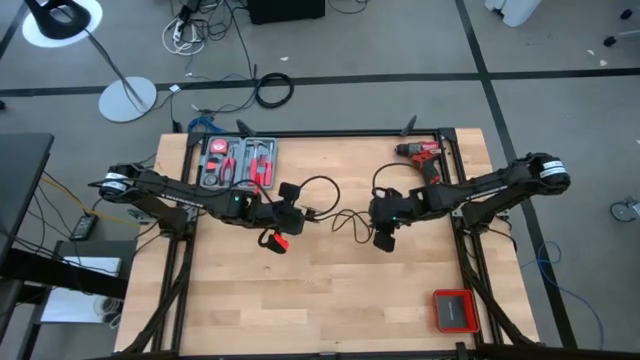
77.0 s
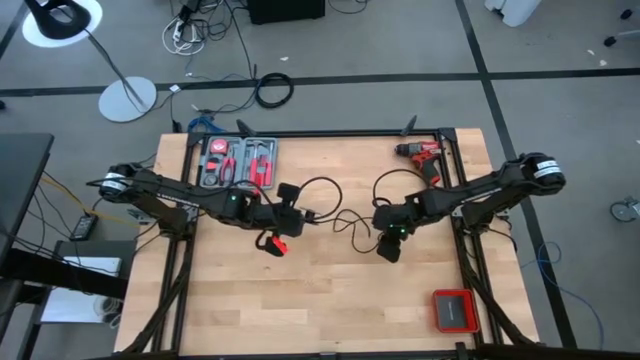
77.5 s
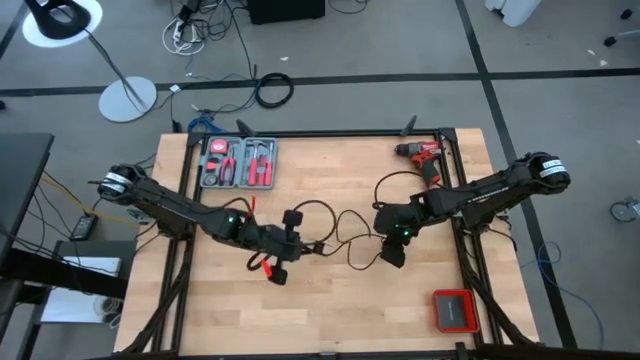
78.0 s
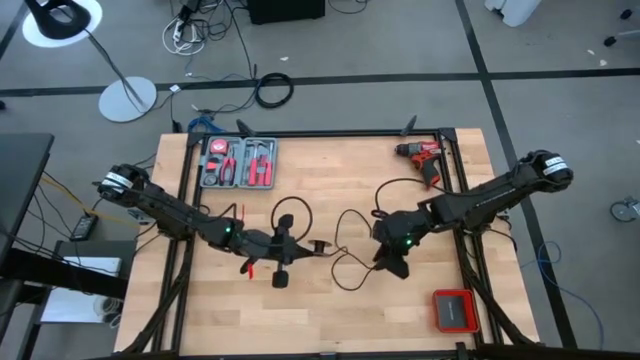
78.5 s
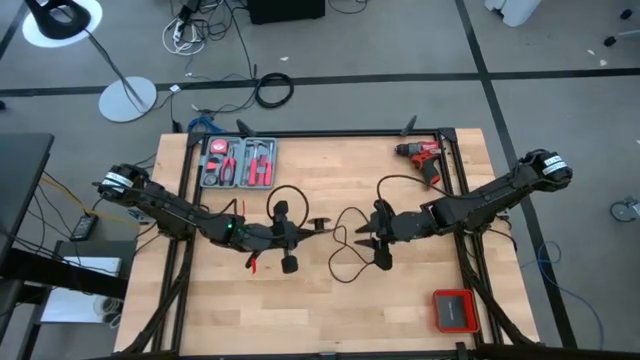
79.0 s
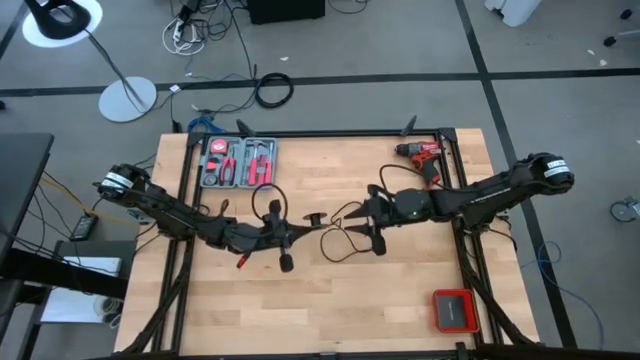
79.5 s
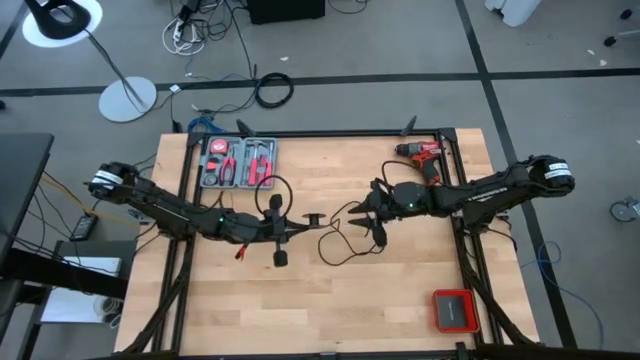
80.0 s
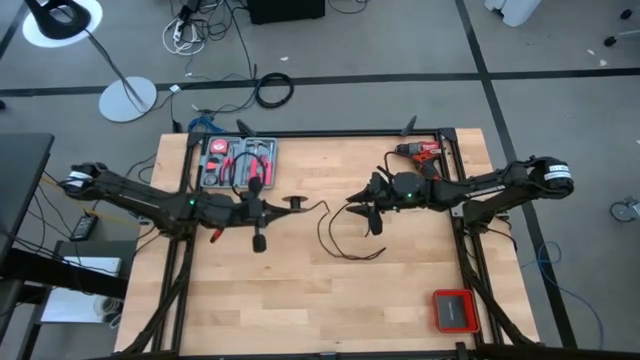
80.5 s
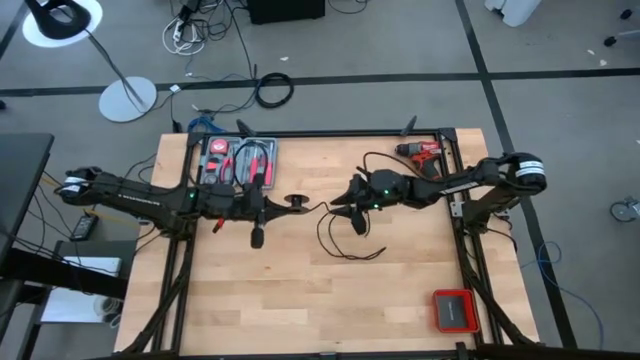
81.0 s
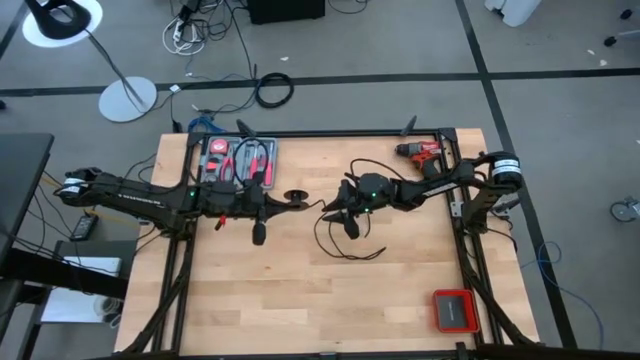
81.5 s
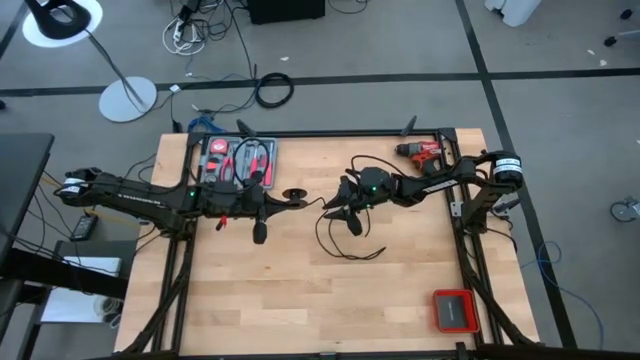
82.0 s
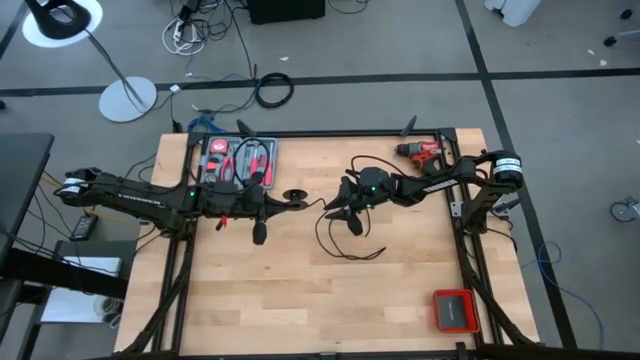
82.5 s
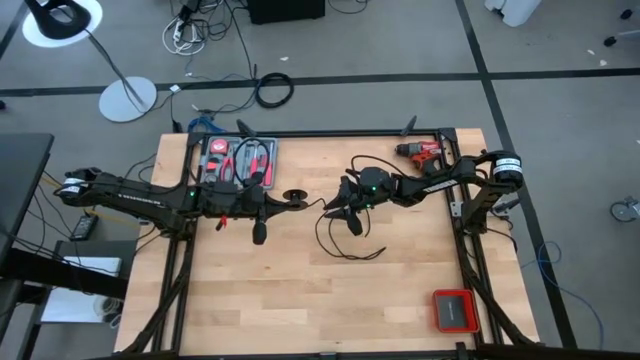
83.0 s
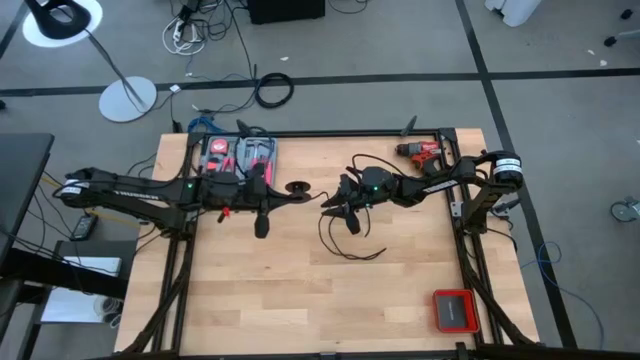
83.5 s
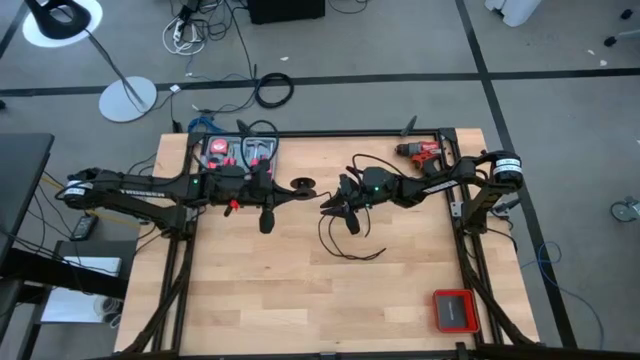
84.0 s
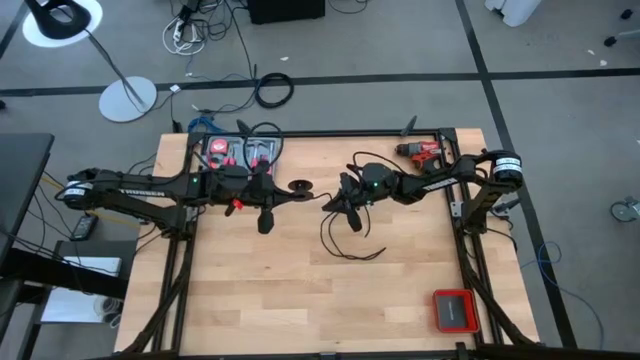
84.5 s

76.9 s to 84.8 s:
Task: Coil cords
Coil the black wire on the black spool

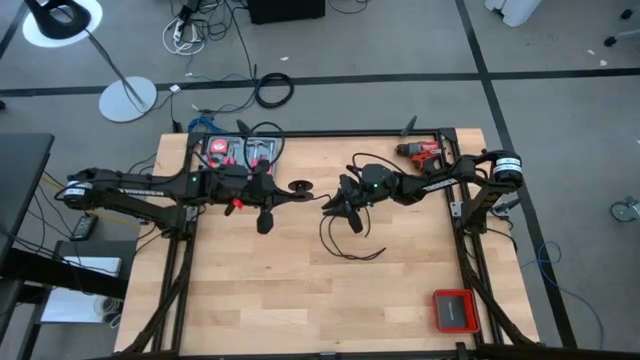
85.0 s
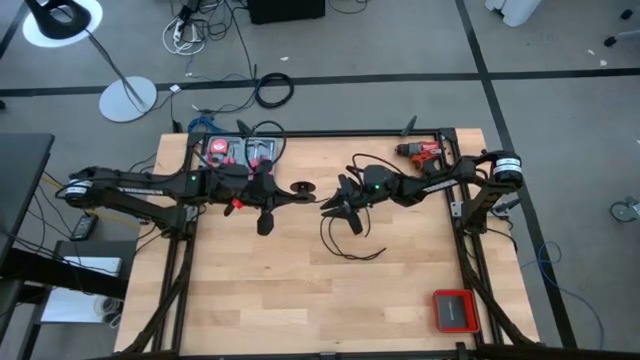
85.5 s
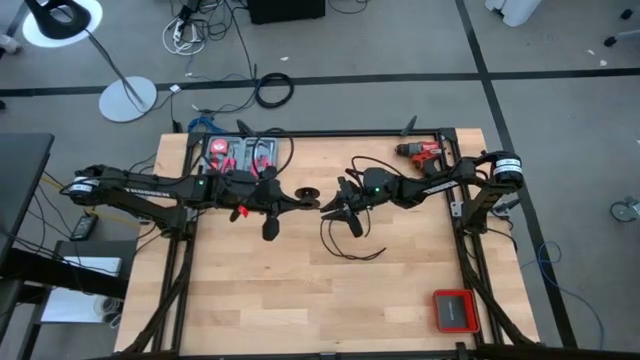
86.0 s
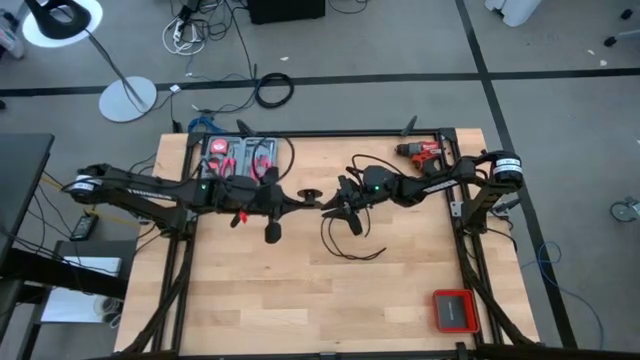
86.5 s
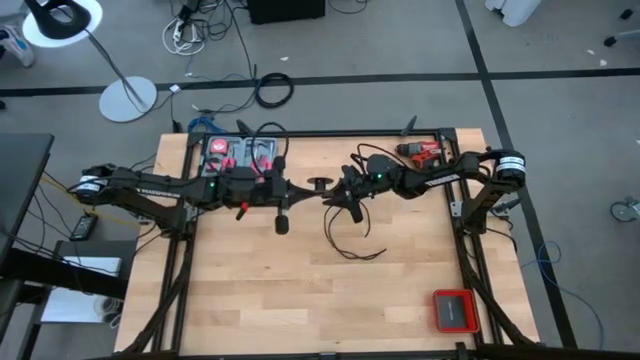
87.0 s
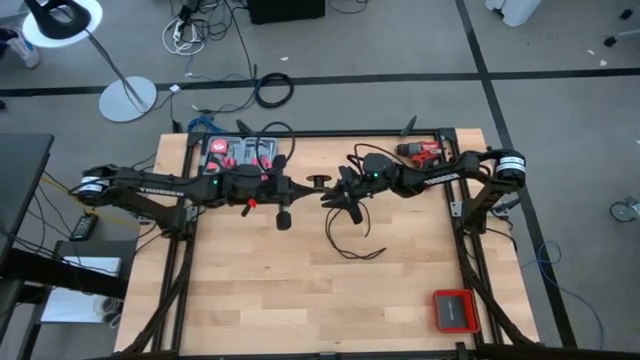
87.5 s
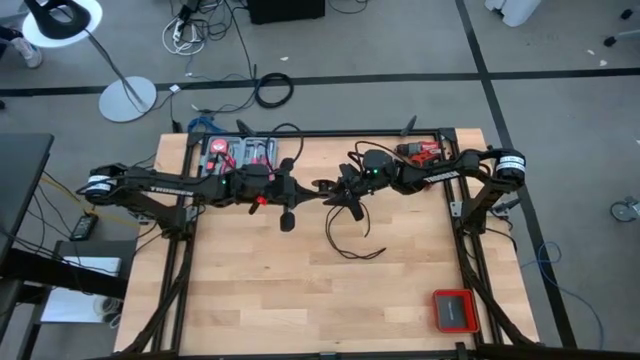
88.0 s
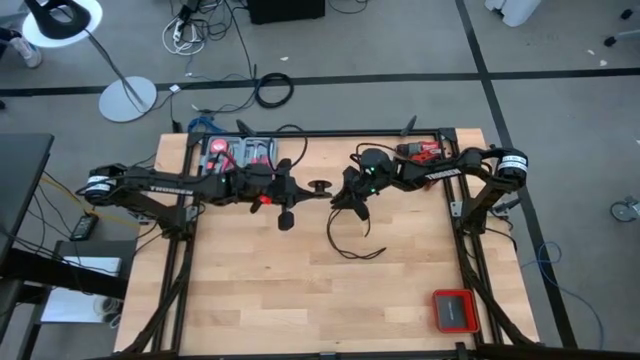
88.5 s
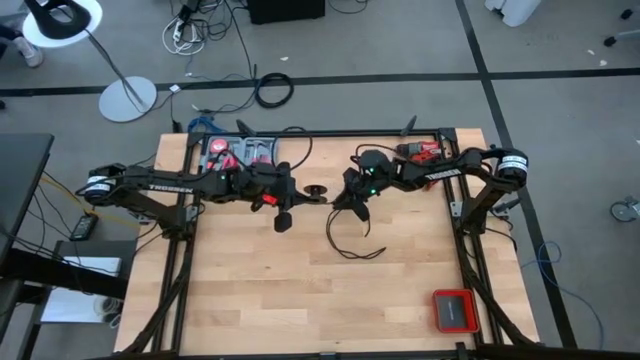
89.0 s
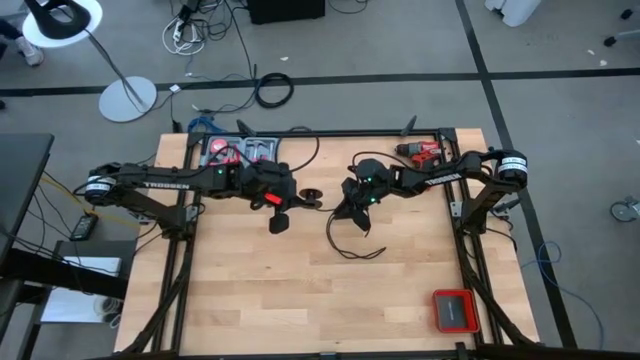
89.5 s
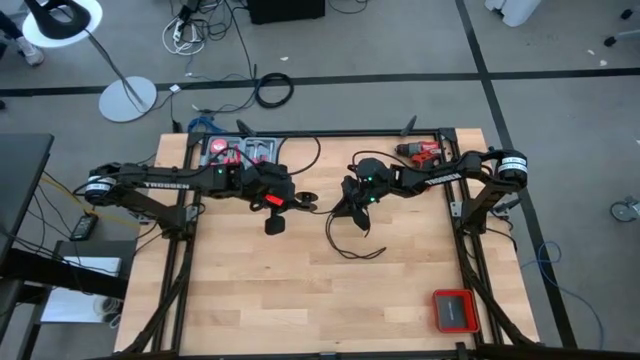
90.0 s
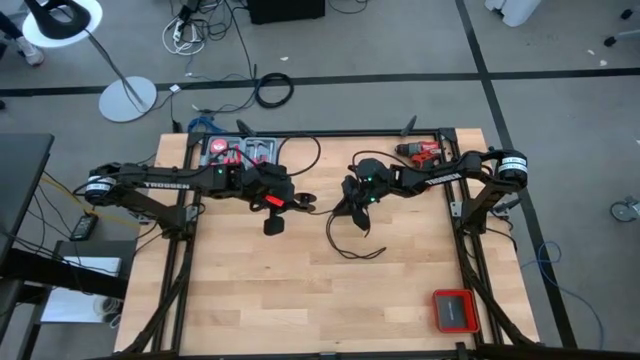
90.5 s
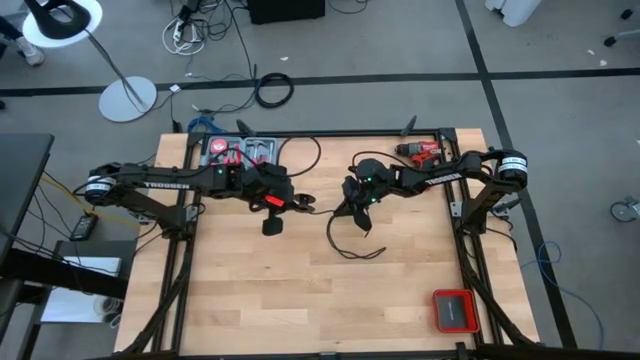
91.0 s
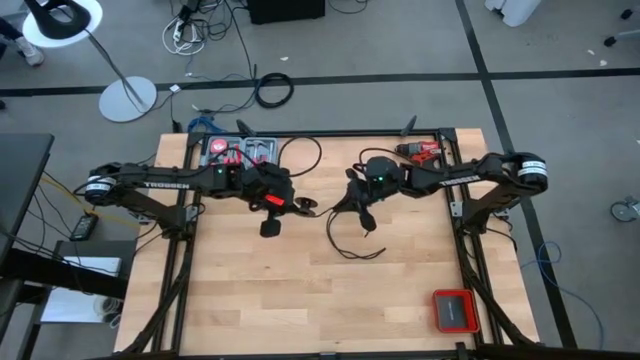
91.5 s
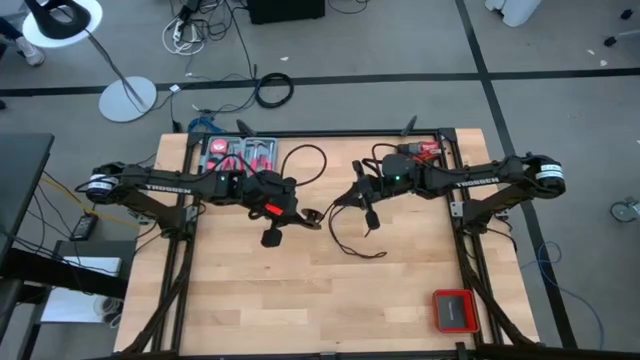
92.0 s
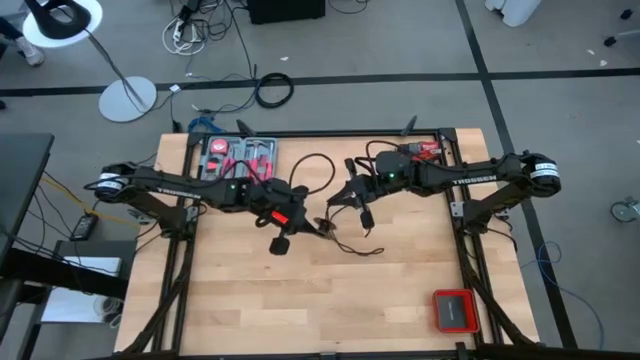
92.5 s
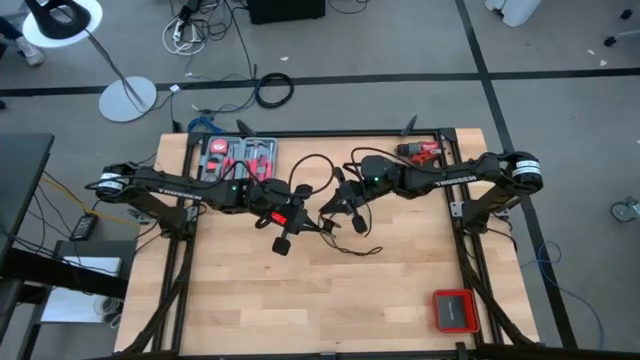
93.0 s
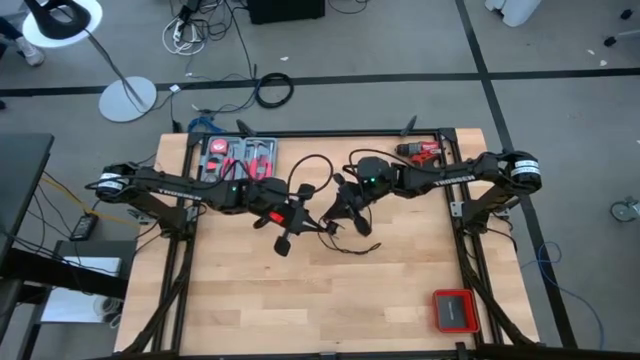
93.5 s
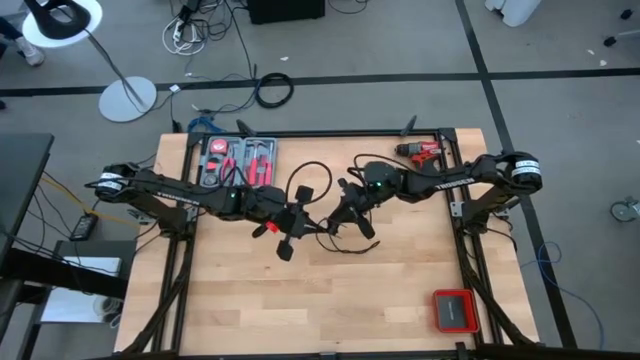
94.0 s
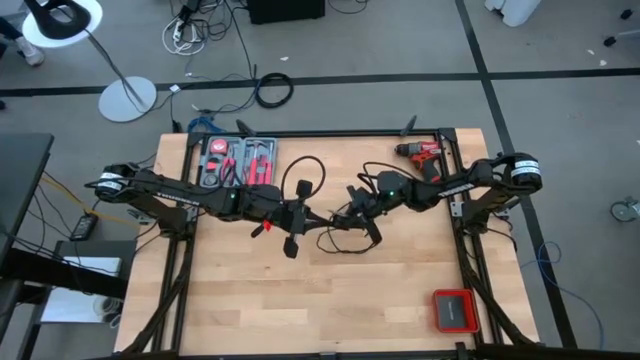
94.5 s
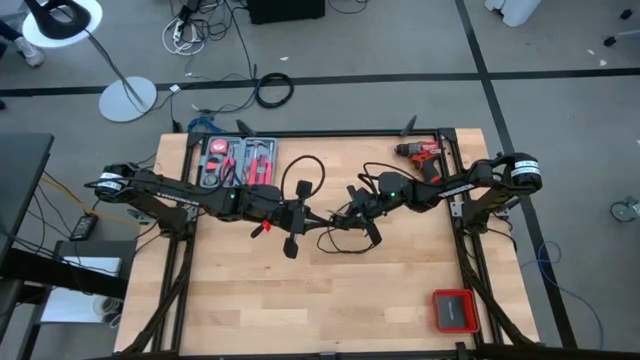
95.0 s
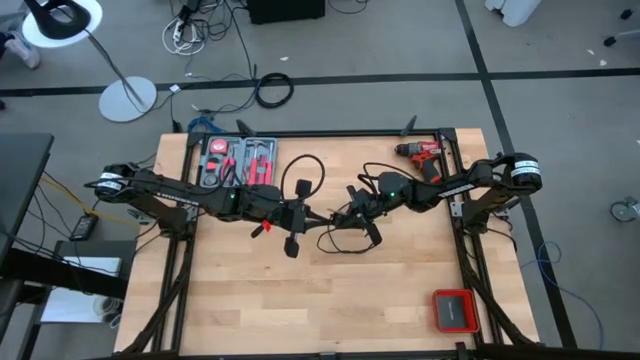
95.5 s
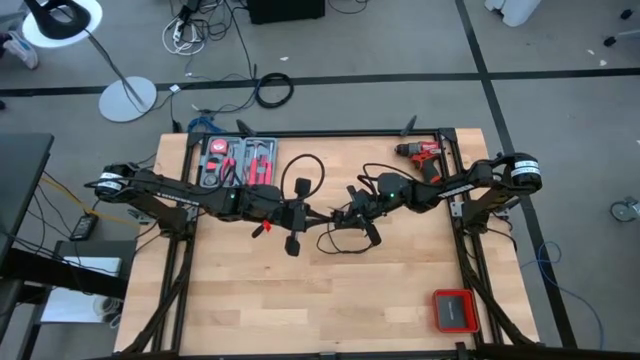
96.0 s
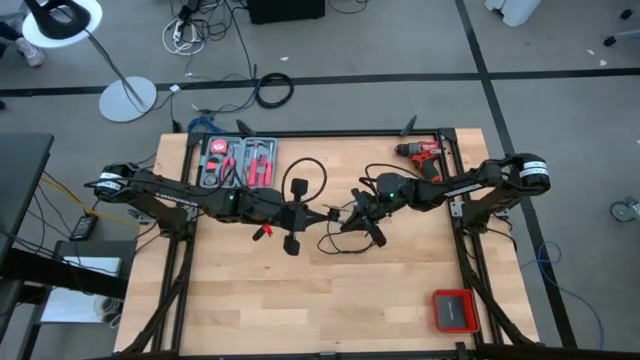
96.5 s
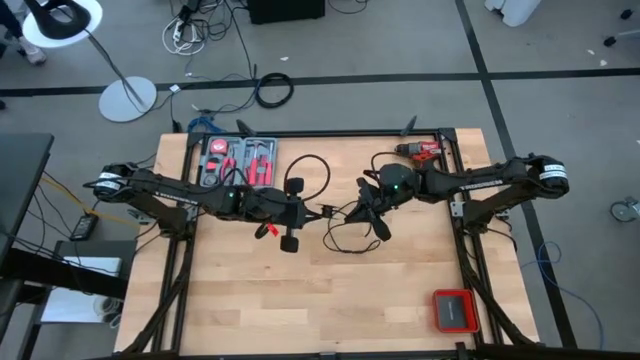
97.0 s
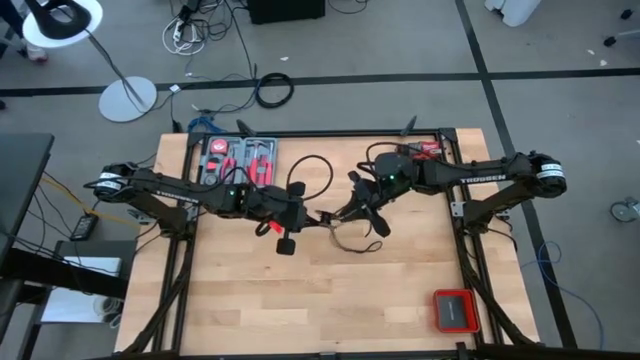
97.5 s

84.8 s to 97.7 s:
Coil the black wire on the black spool
